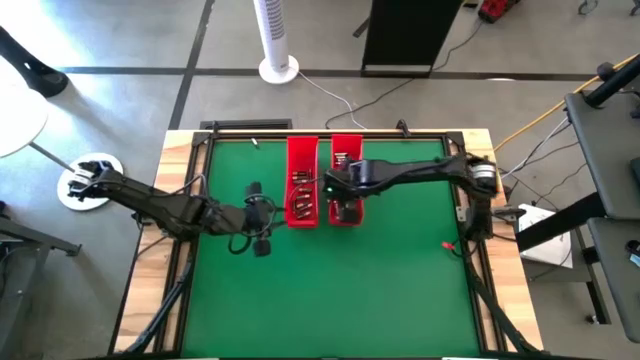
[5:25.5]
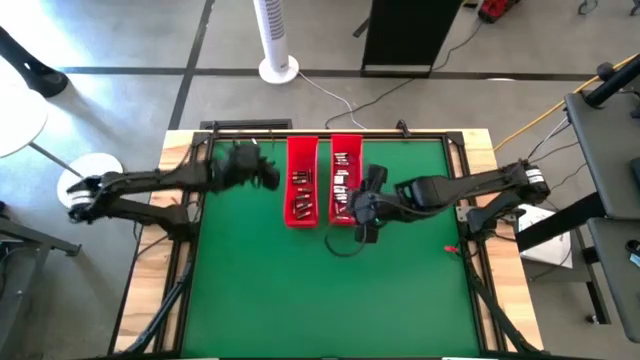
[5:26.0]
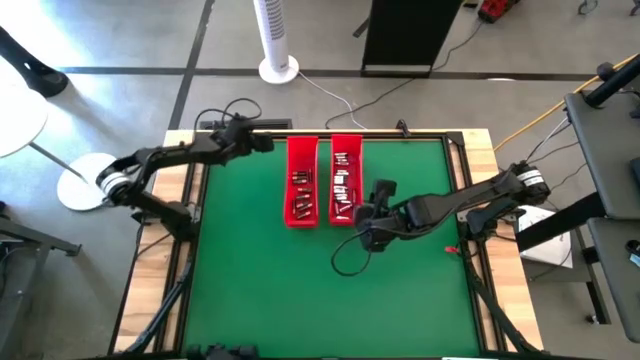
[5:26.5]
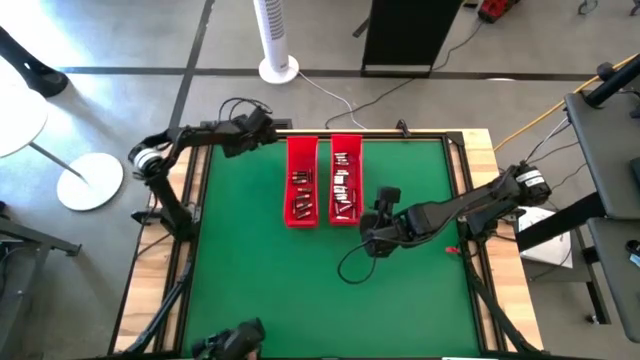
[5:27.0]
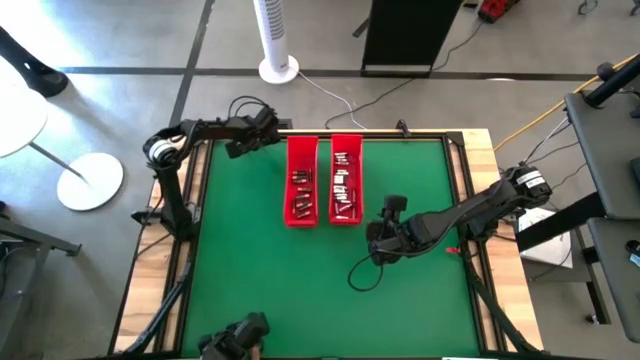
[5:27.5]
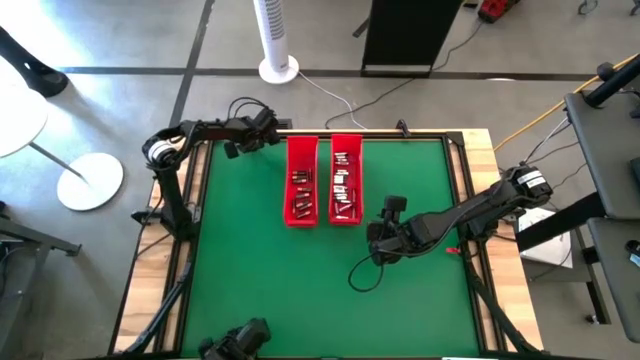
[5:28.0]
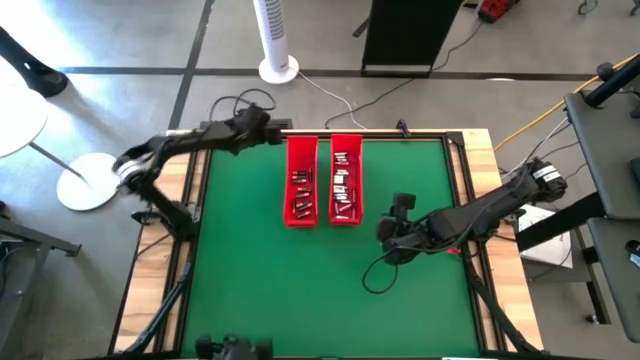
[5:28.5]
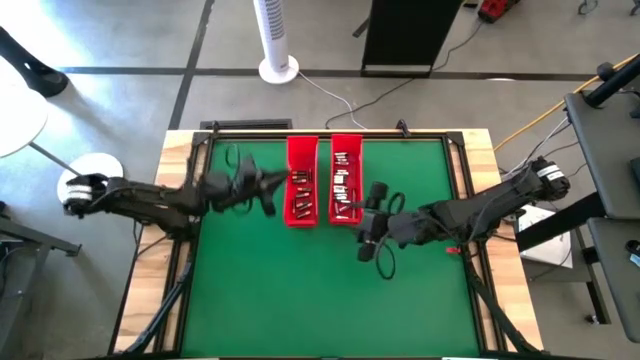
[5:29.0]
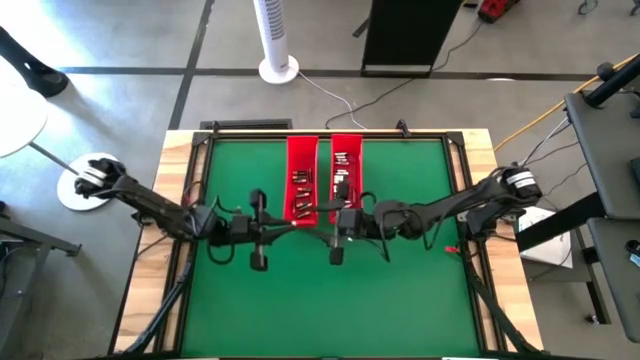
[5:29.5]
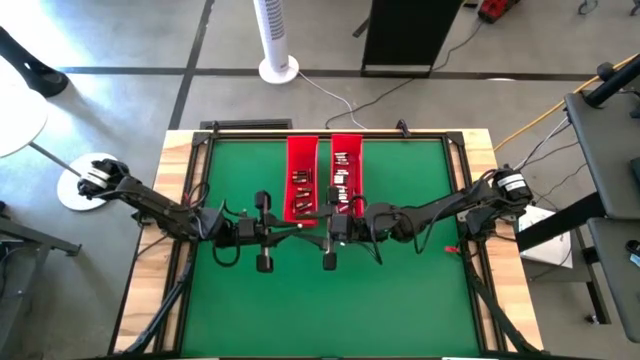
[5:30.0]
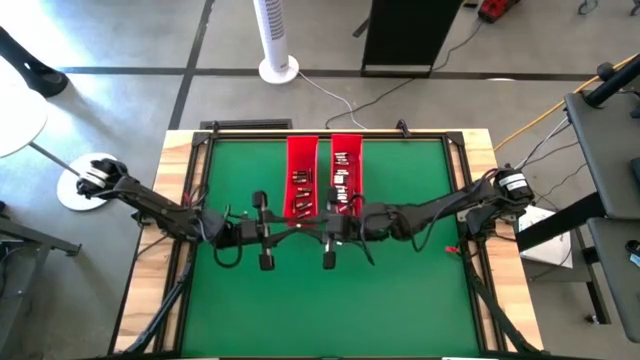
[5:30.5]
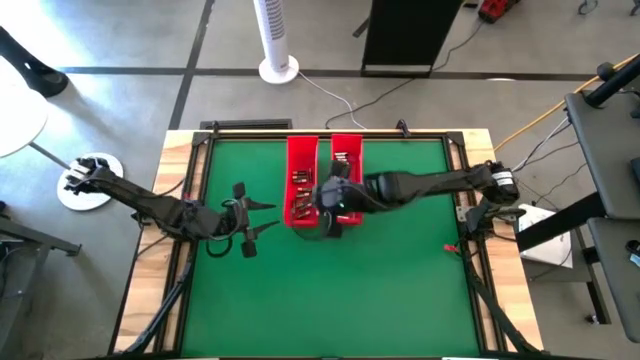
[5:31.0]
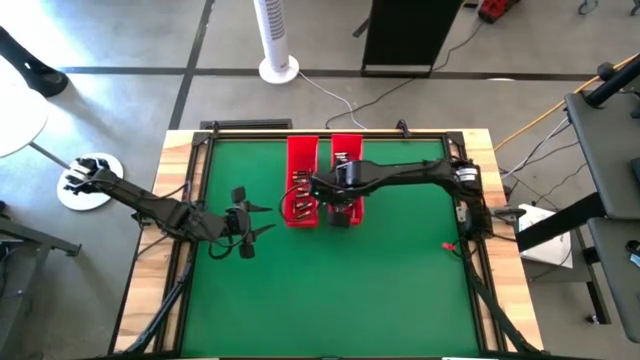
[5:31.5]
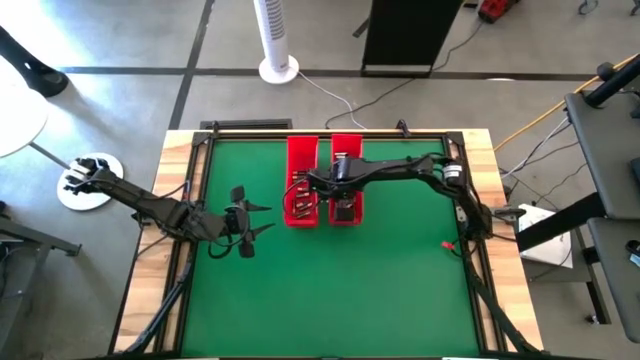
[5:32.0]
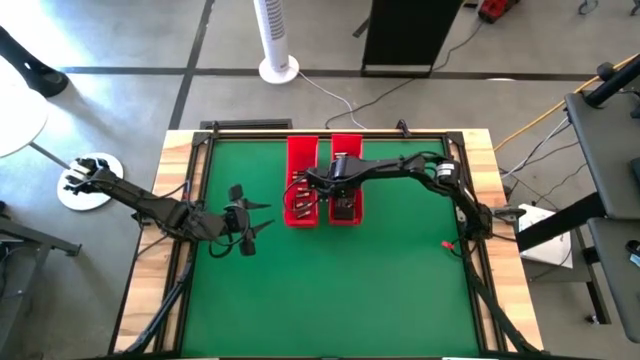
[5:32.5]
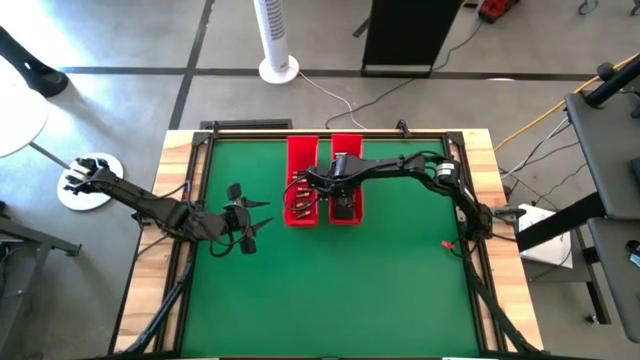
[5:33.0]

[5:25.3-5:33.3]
Task: Sort batteries
Put the silver battery into the right red bin

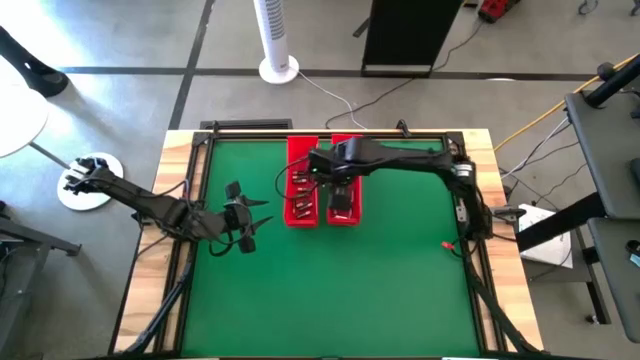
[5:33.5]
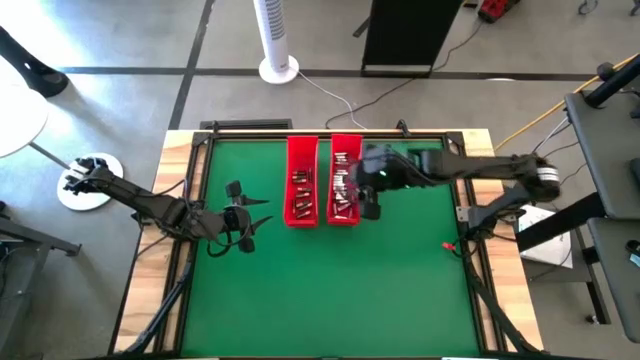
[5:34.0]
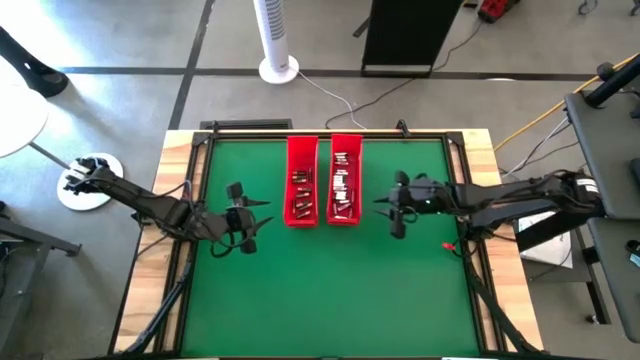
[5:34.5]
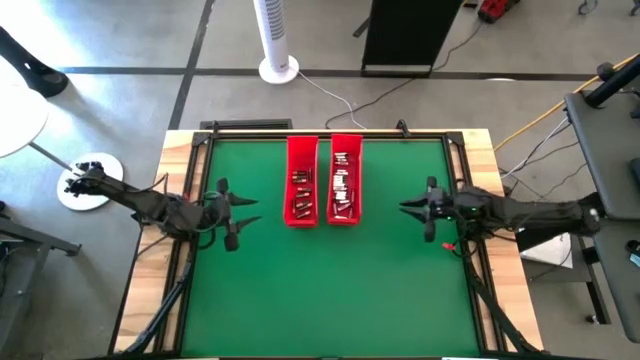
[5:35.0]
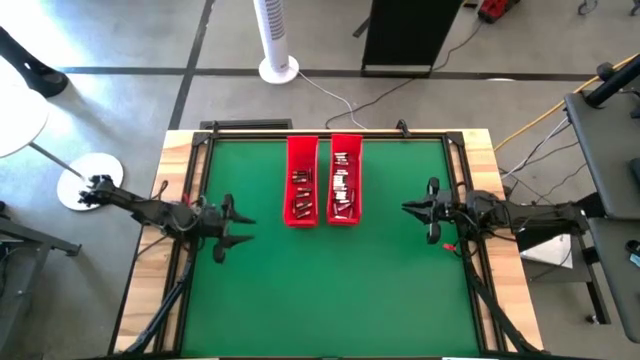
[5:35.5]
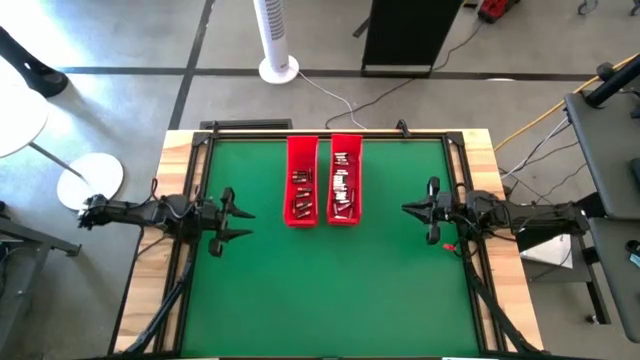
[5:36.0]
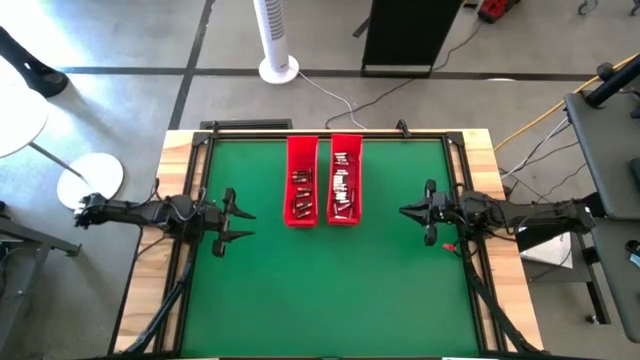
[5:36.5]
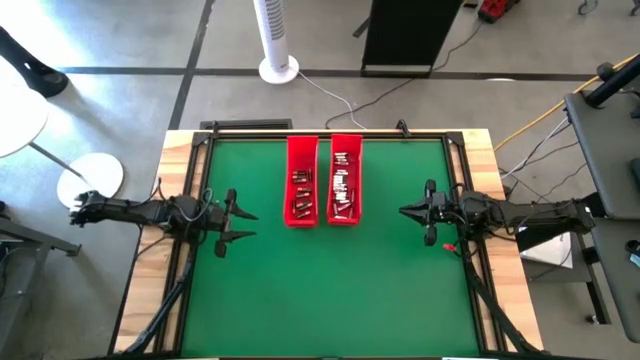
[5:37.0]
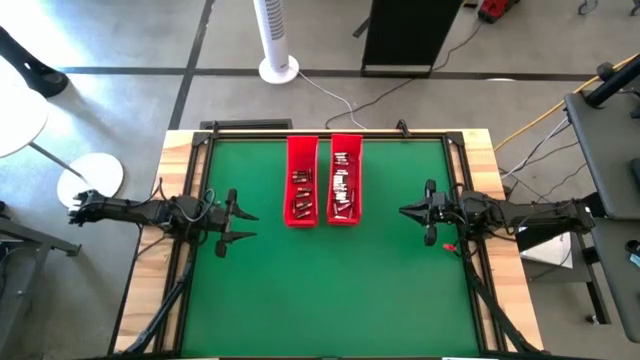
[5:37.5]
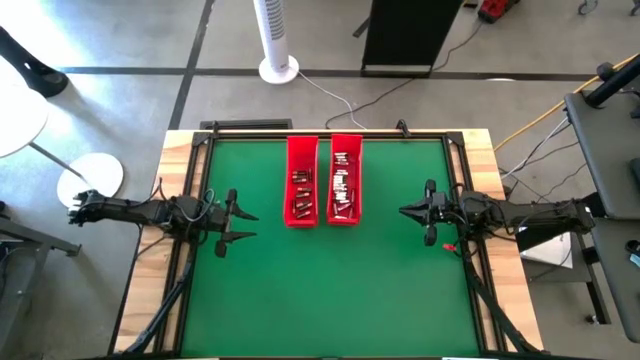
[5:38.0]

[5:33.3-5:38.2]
Return to Home Position

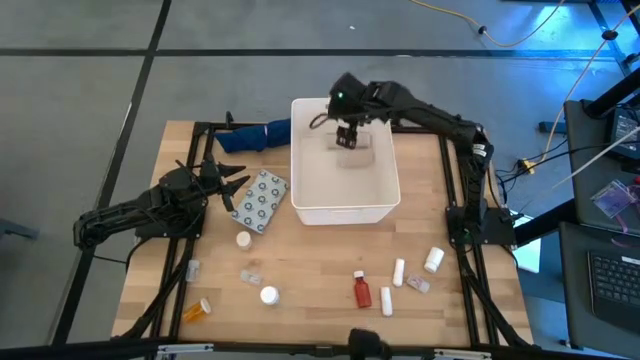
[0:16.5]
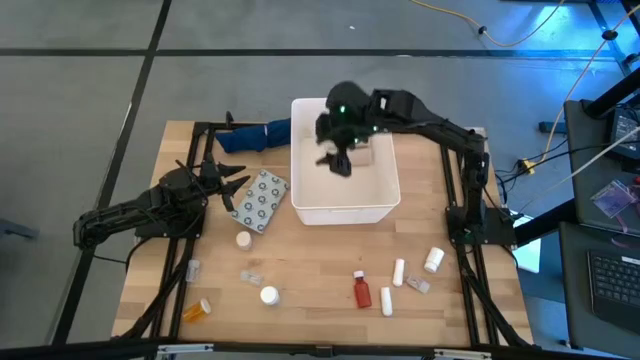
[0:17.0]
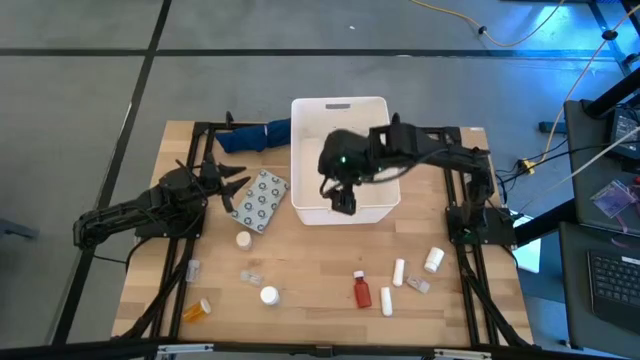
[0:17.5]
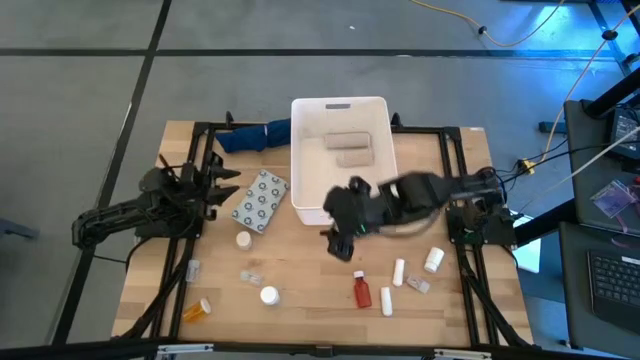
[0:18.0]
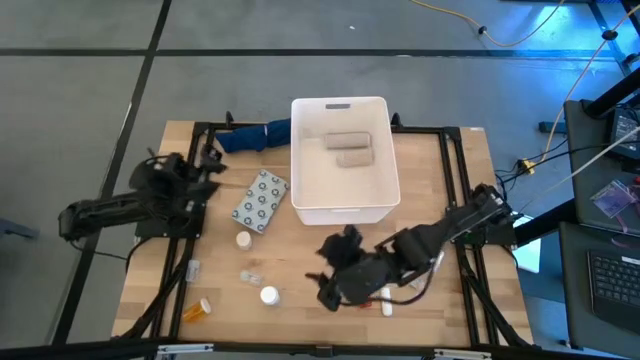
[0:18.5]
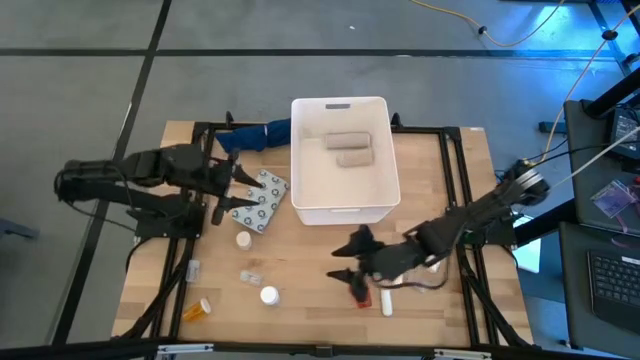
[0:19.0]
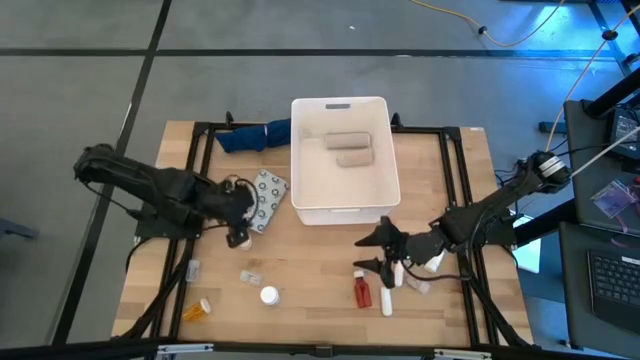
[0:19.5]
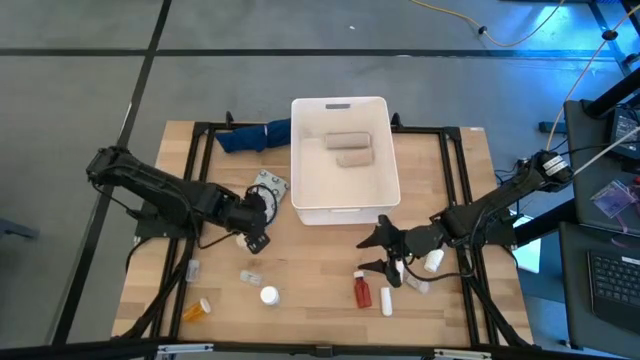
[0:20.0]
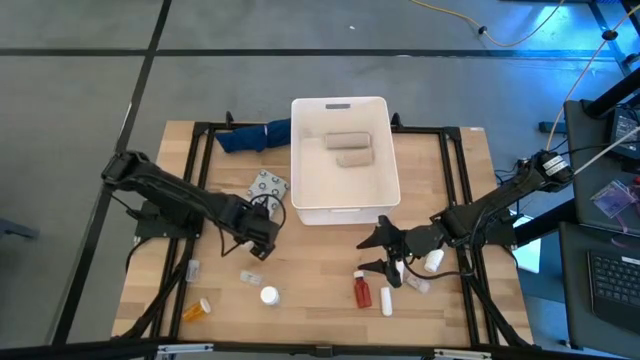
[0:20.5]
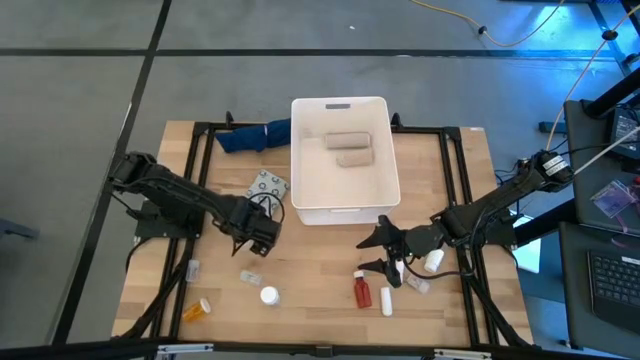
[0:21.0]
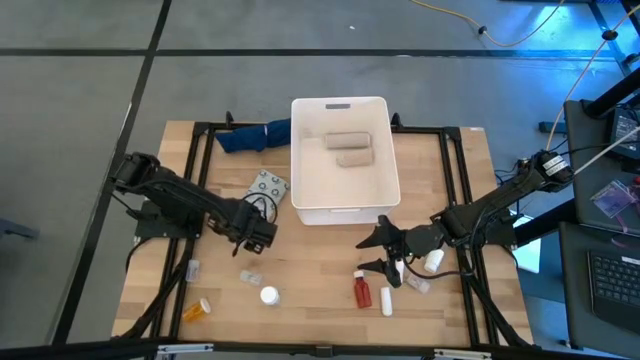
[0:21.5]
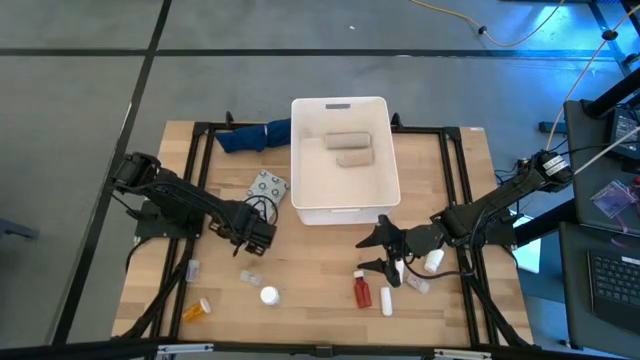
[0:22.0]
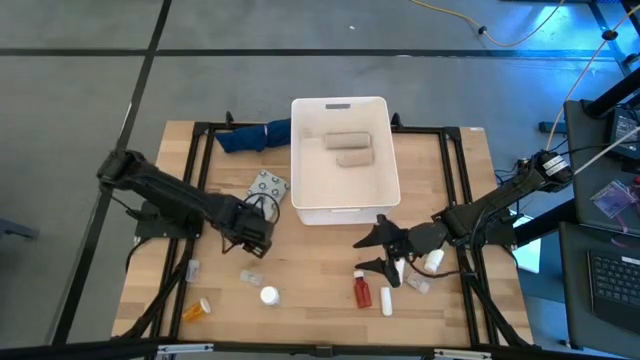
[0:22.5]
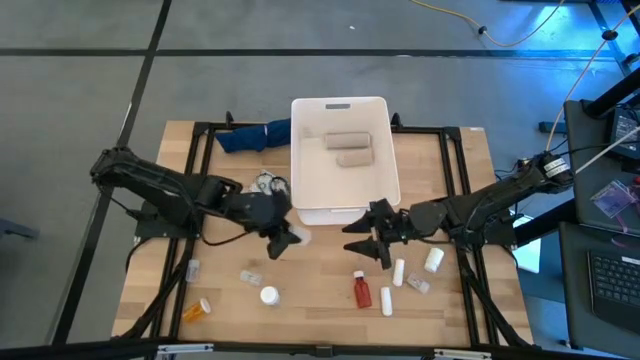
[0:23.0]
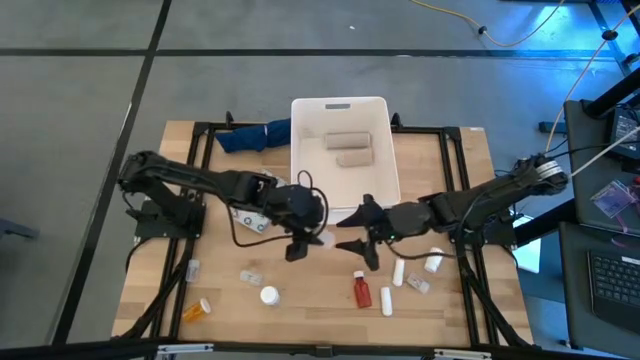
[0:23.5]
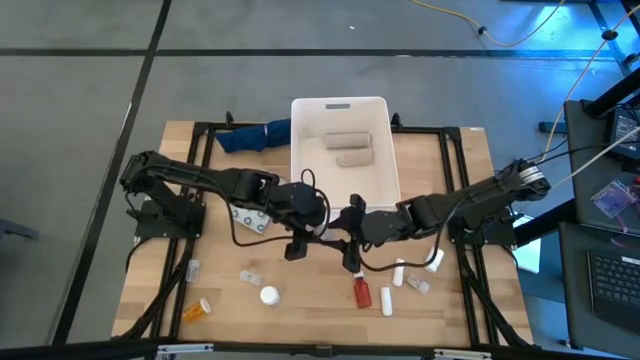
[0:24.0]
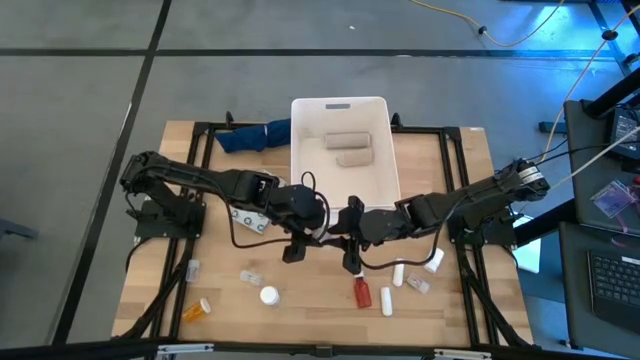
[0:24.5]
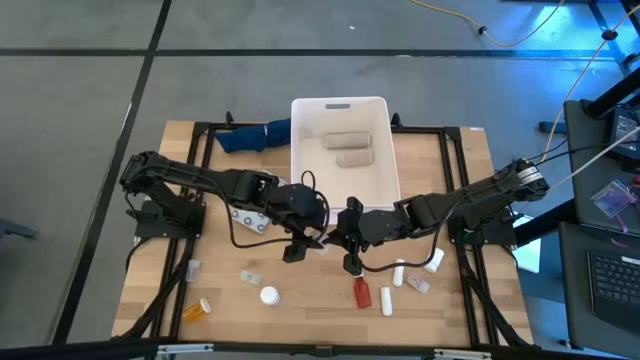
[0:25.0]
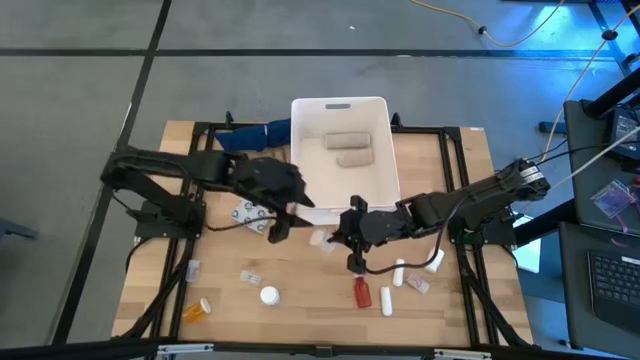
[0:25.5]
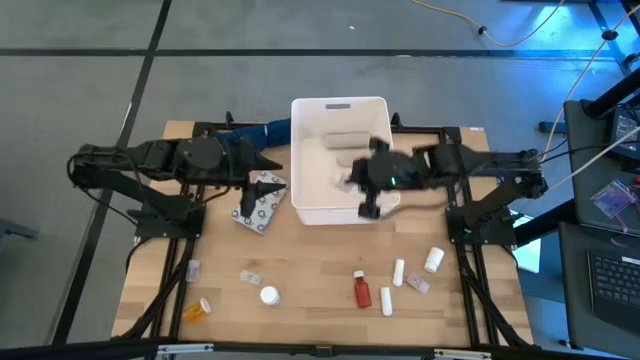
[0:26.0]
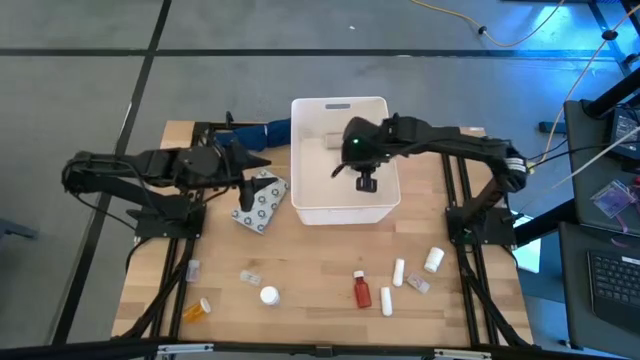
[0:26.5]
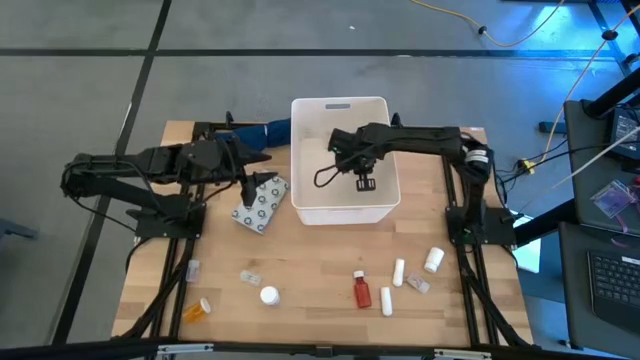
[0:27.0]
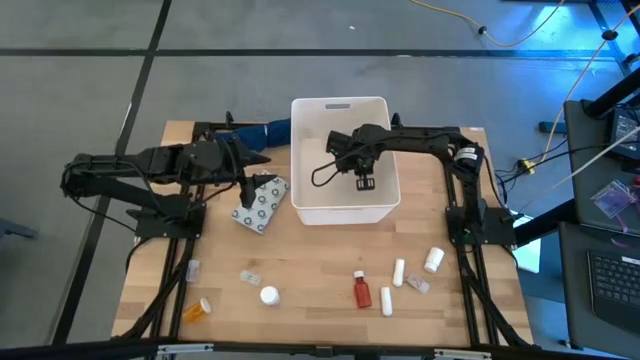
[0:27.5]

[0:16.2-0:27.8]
Task: Pick & place medical supplies in basket/bin
Put the white bandage into the bin
